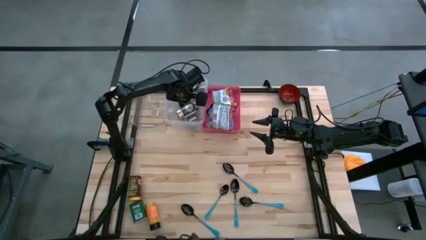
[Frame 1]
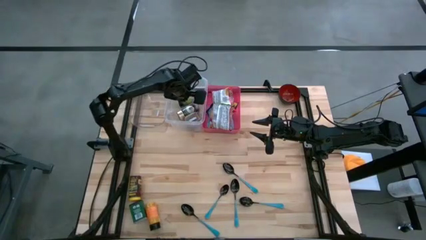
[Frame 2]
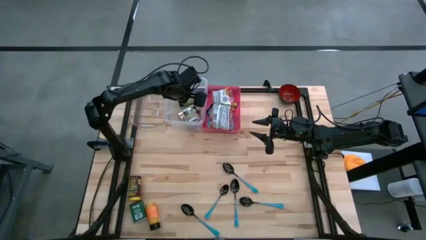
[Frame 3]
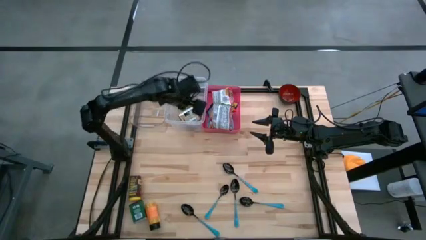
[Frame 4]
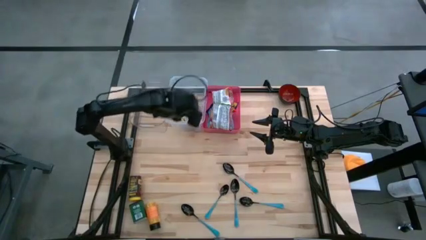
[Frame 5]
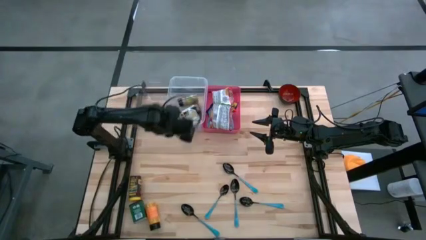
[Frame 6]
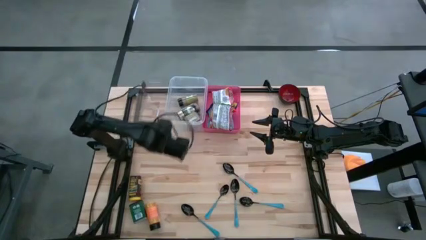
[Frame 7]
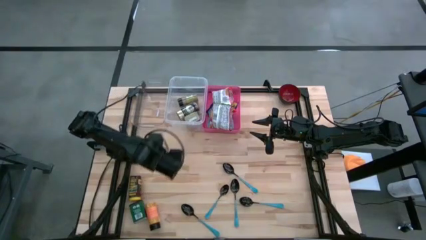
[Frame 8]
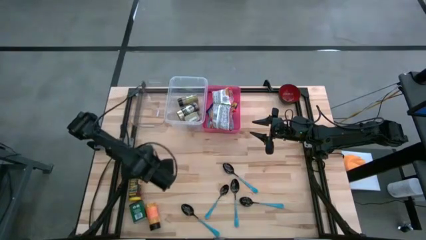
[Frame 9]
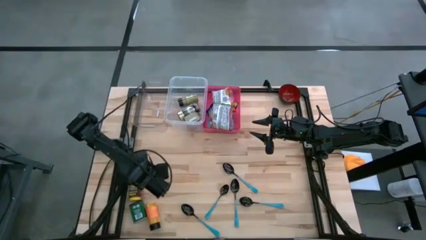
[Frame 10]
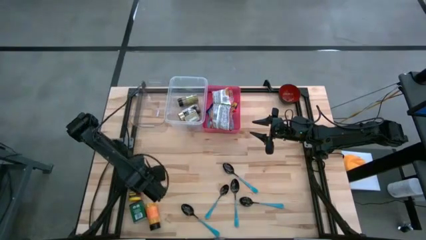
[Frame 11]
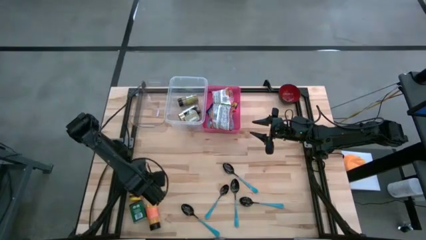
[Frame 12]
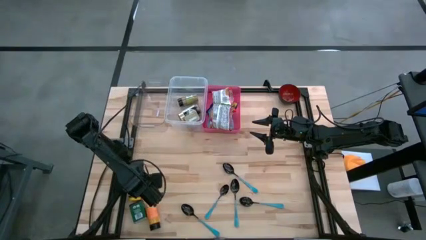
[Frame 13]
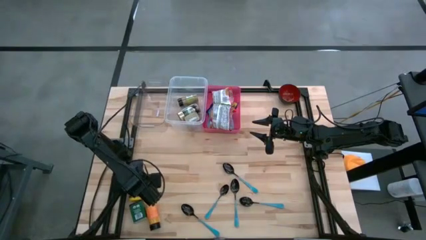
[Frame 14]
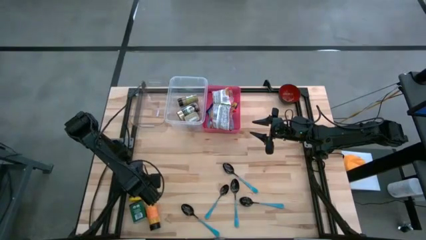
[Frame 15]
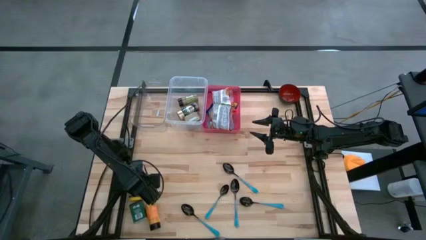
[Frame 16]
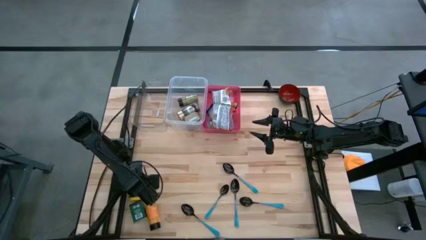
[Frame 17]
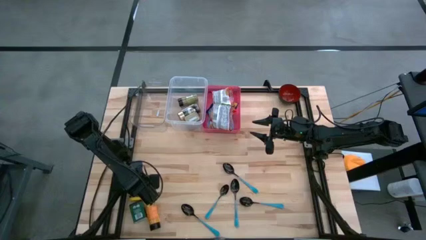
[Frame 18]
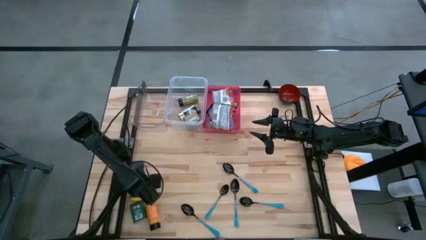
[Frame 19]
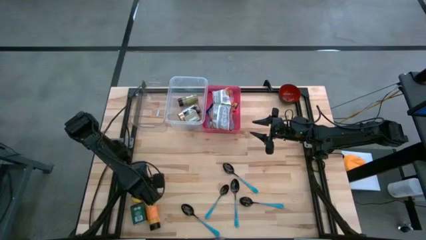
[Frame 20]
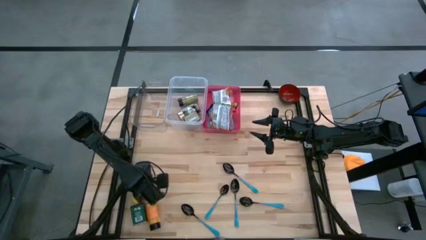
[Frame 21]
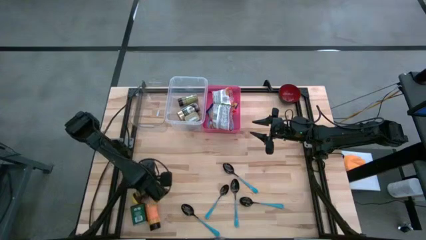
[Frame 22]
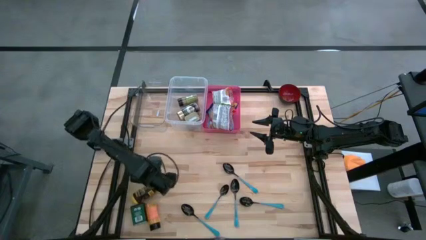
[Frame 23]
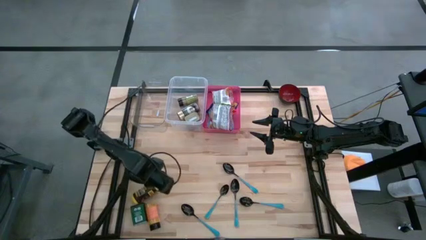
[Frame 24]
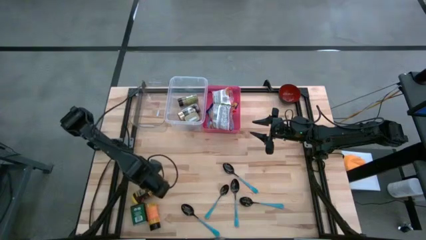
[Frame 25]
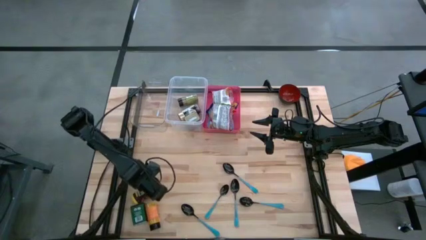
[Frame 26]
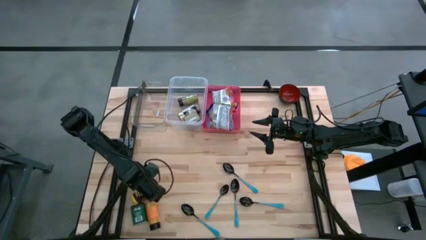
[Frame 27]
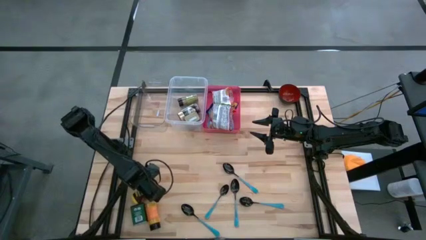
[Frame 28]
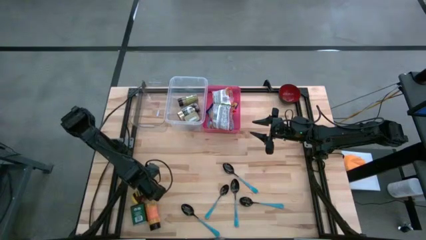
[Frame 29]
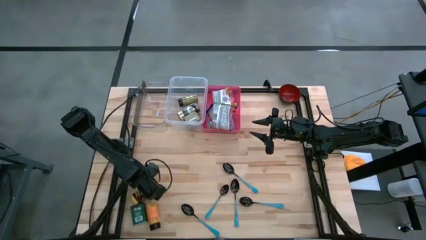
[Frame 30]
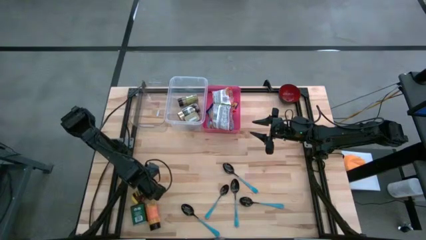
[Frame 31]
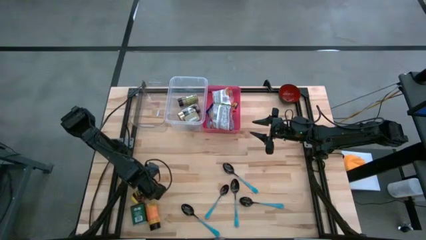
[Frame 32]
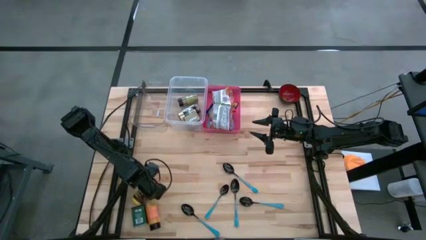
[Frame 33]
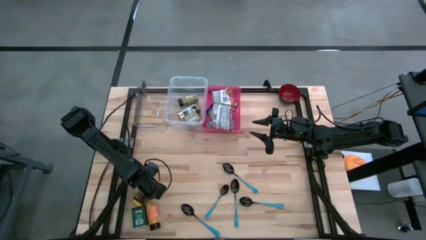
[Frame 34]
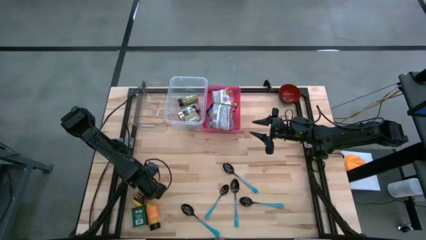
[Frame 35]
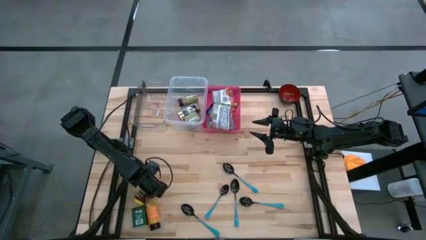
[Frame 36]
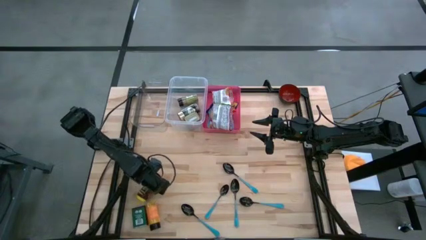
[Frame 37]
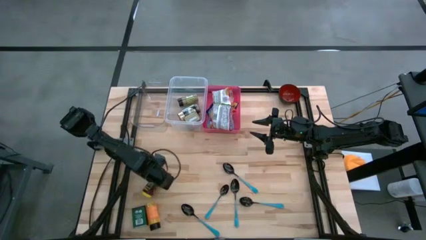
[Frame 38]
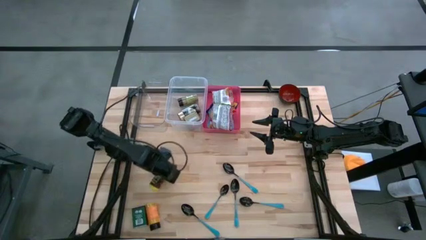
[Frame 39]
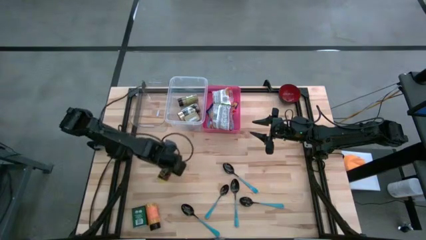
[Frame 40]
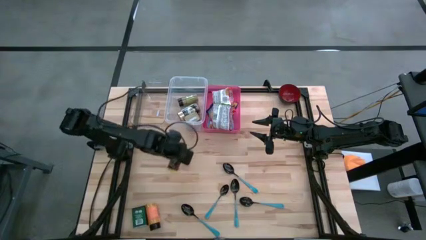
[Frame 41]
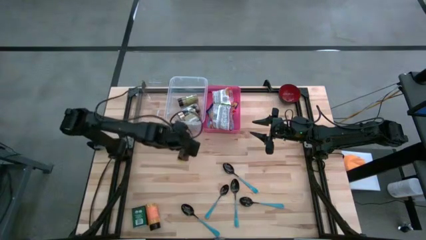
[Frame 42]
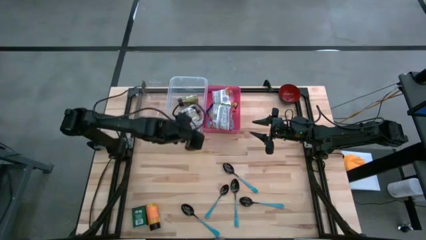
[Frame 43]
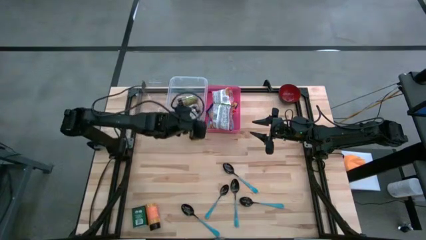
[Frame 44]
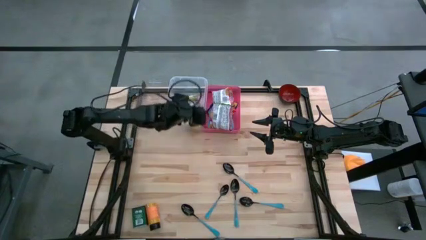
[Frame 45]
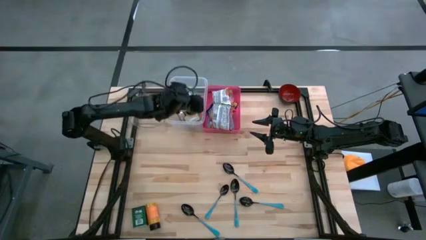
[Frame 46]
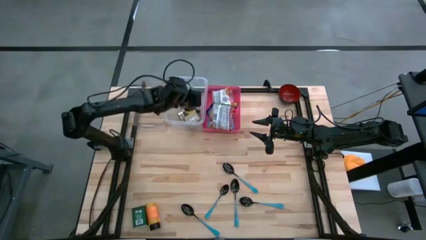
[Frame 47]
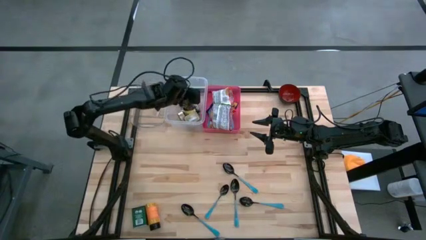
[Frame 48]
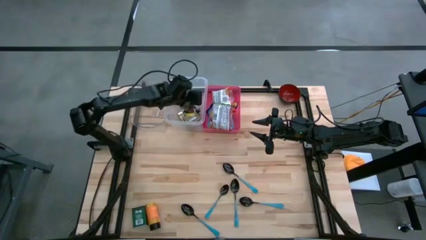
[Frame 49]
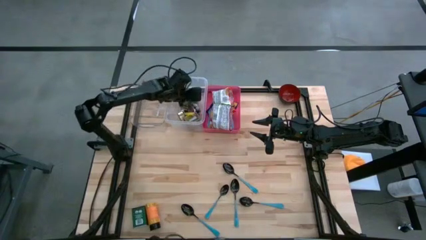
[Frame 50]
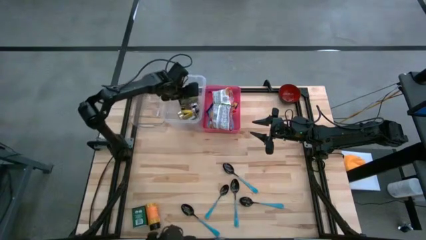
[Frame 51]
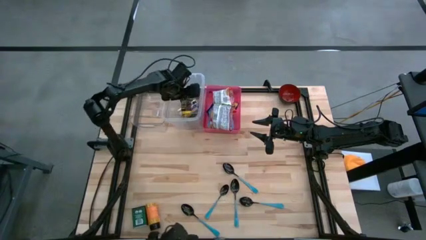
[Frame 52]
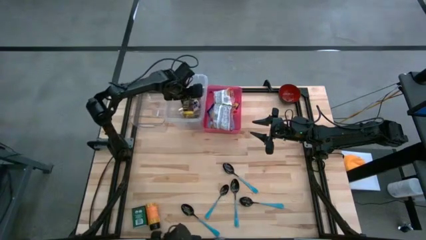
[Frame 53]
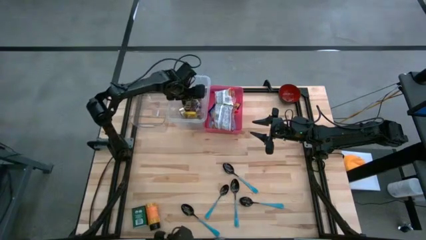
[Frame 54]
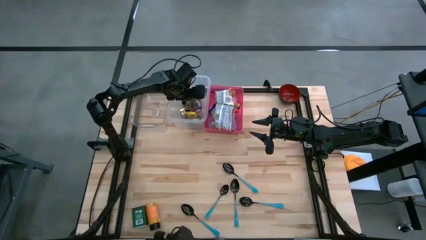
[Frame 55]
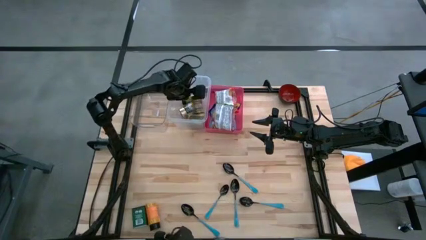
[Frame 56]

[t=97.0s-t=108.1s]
Put the dark brown seasoning bottle into the right transparent bin

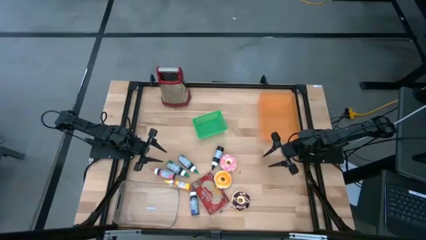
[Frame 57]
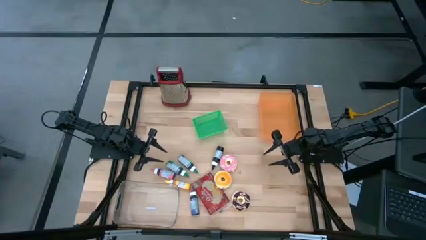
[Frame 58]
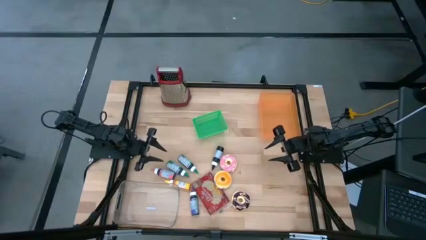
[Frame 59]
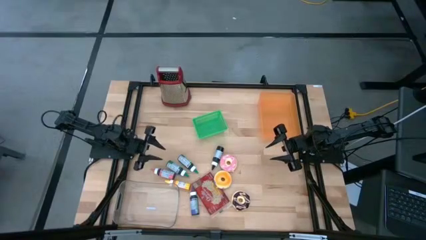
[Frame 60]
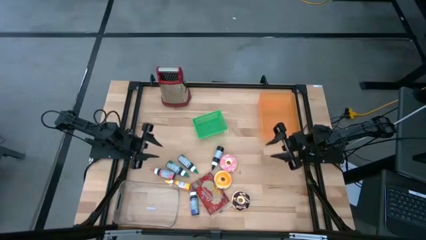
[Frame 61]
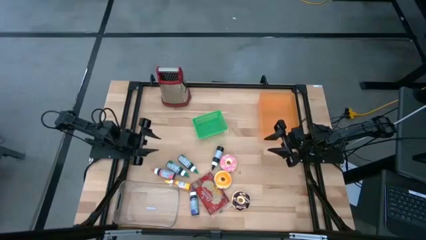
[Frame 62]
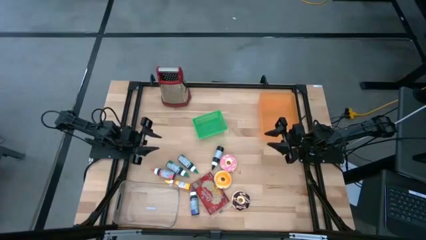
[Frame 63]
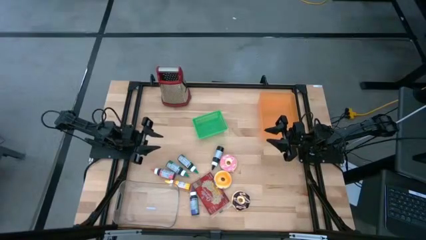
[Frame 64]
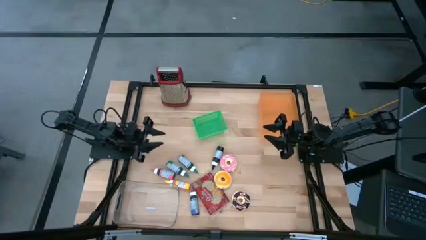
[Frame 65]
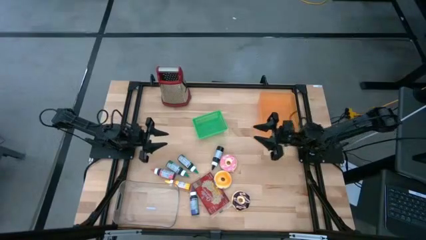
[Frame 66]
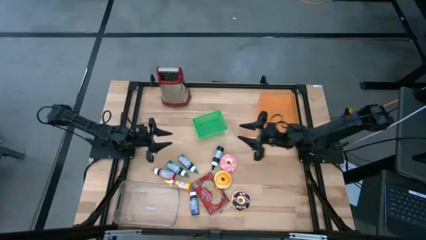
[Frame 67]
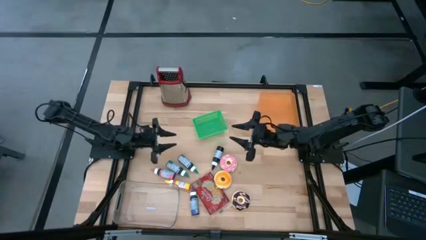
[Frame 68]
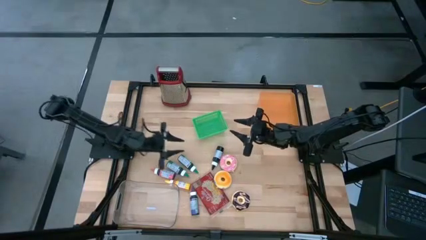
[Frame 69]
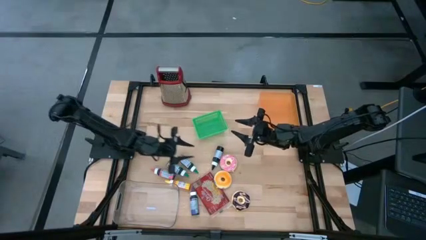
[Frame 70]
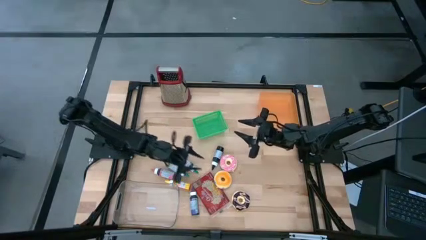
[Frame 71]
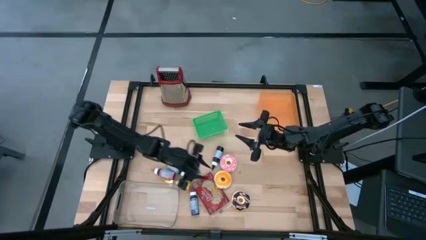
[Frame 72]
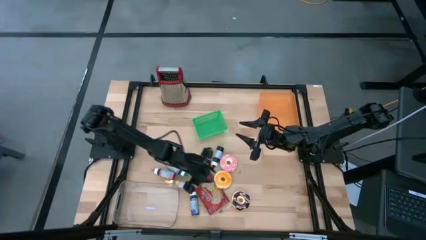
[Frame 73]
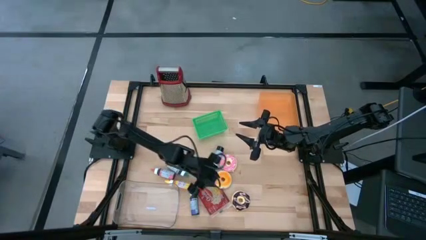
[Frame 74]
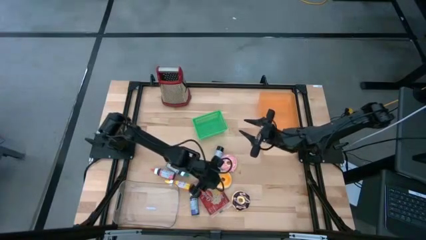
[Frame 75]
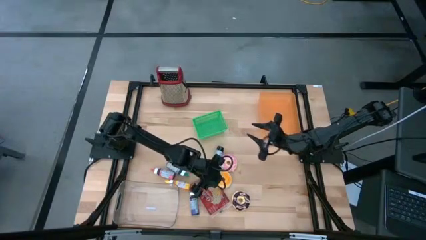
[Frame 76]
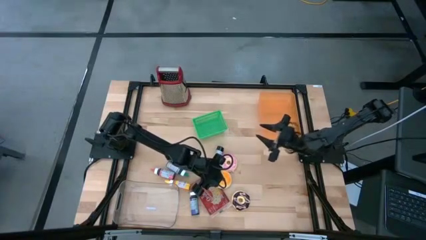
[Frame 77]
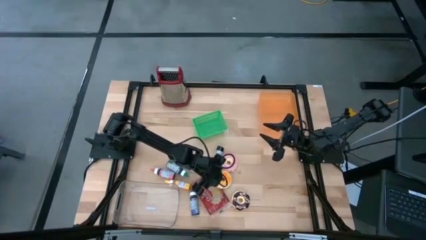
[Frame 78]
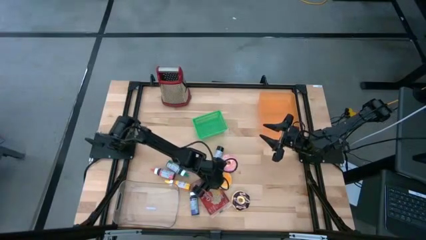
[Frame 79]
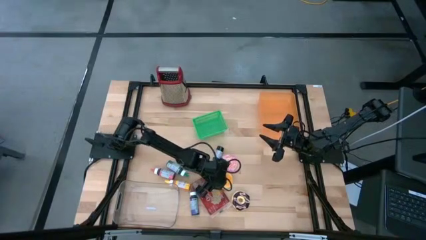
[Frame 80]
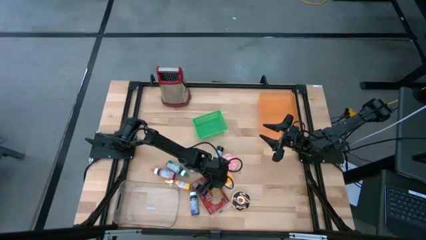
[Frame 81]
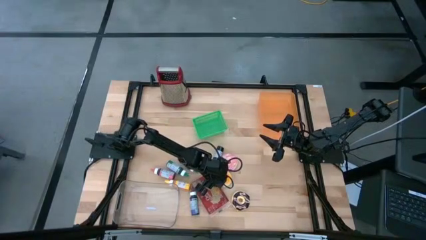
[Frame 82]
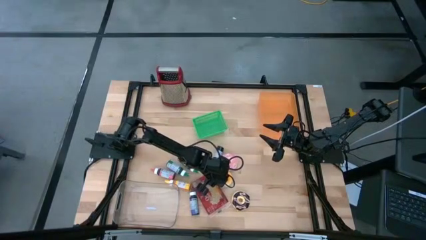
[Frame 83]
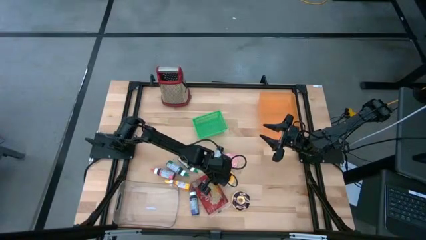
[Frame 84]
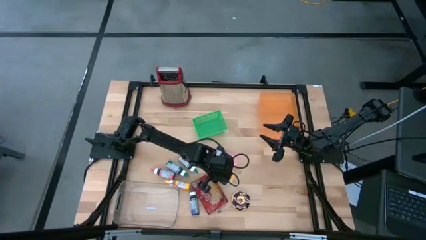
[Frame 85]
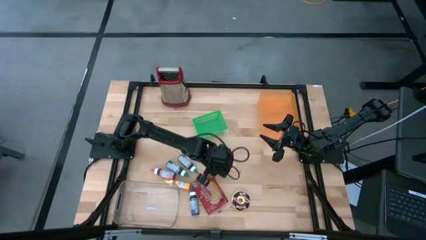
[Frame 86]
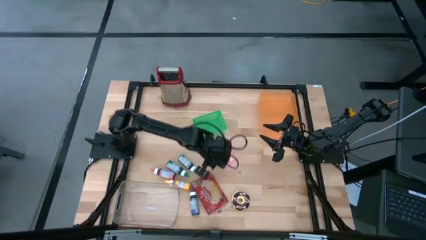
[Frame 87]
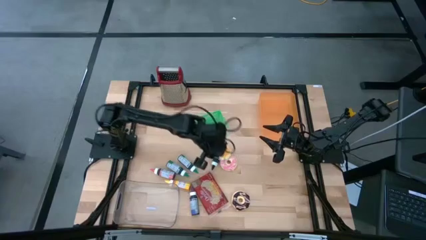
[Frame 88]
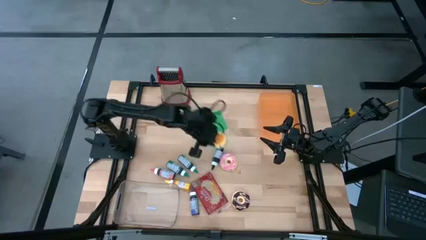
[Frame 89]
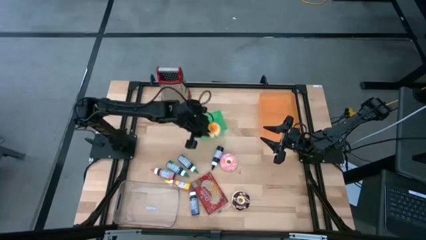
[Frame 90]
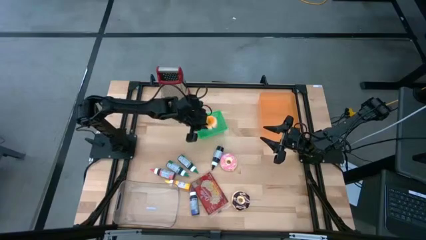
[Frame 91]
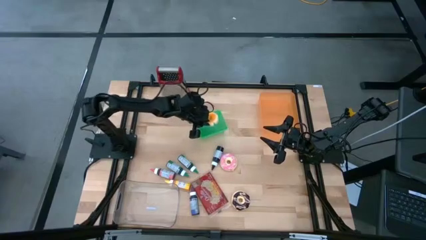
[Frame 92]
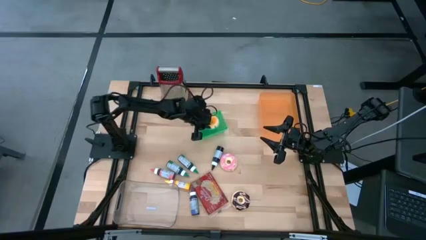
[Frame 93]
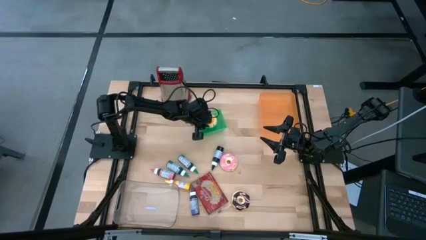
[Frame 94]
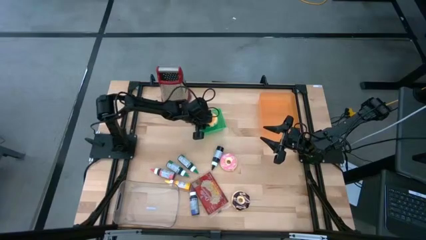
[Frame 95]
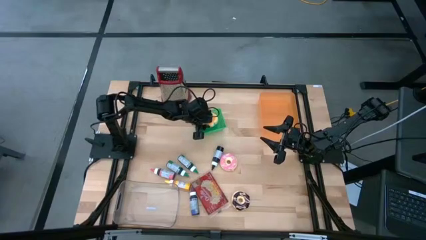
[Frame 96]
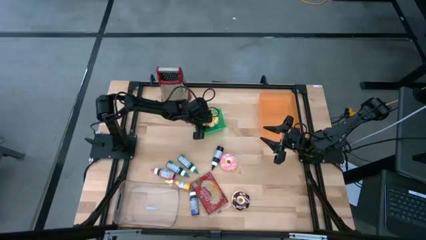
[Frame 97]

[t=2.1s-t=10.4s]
Put the blue donut into the green bin
